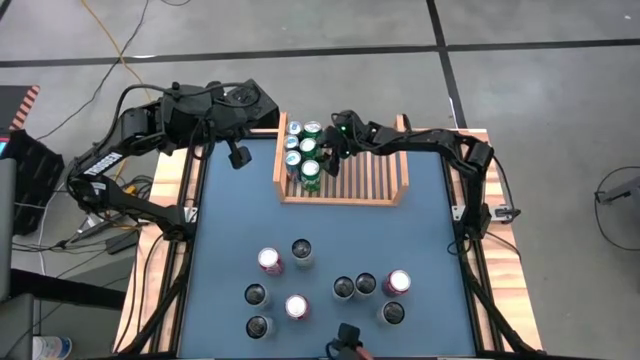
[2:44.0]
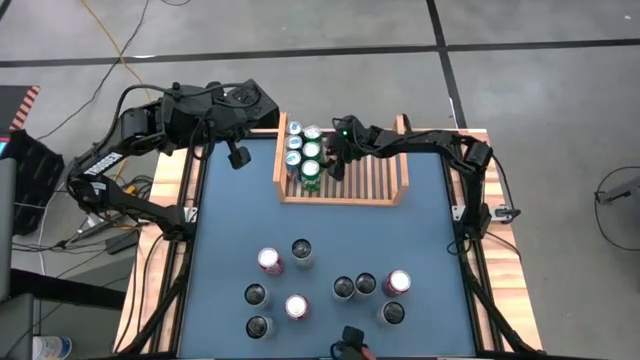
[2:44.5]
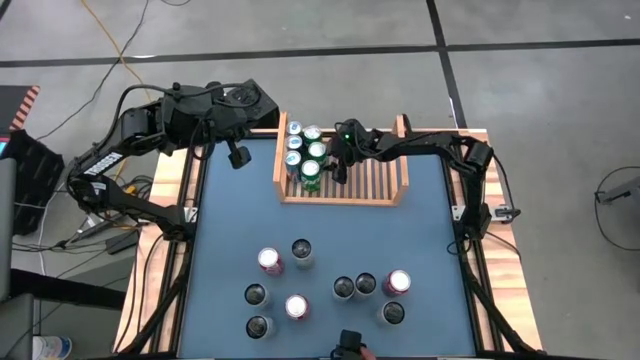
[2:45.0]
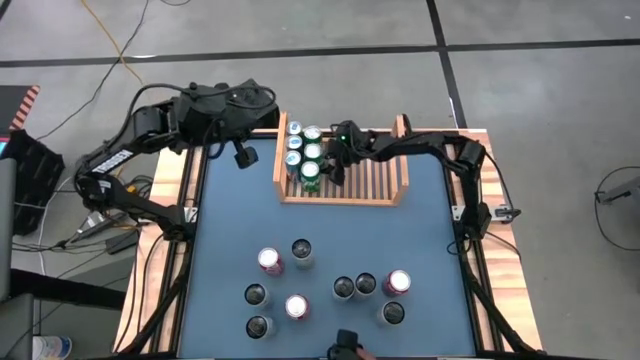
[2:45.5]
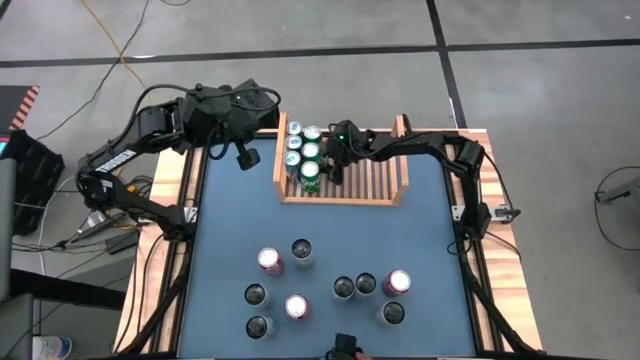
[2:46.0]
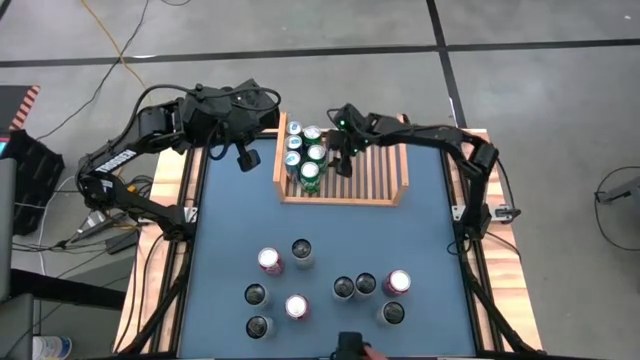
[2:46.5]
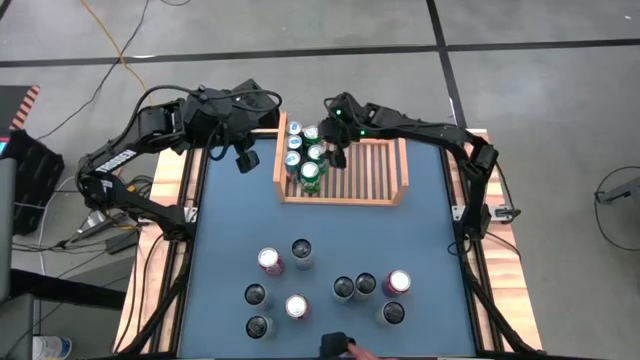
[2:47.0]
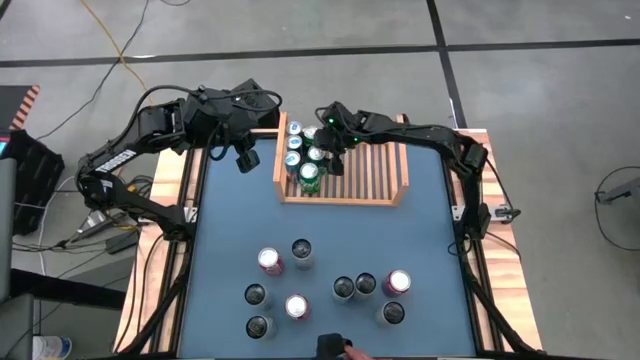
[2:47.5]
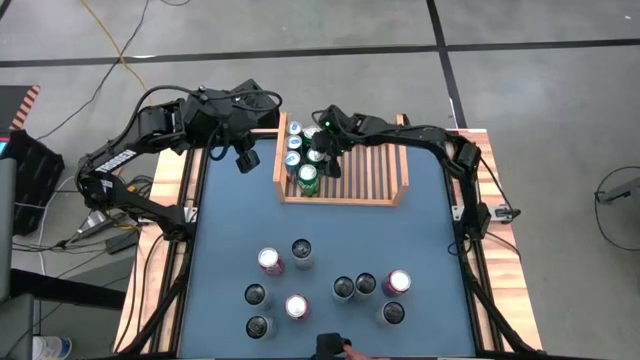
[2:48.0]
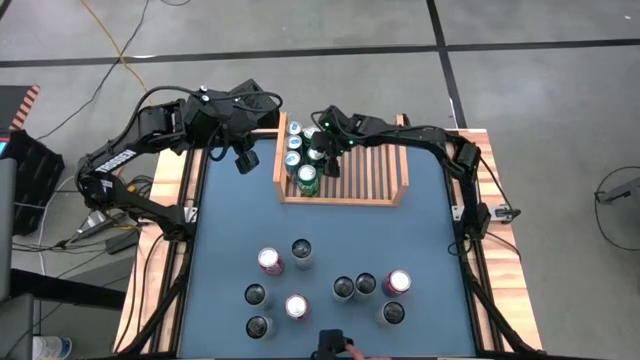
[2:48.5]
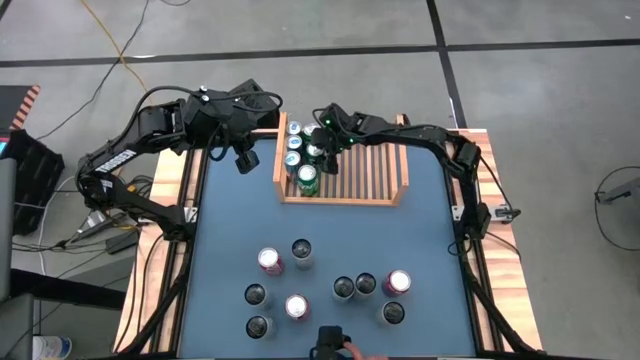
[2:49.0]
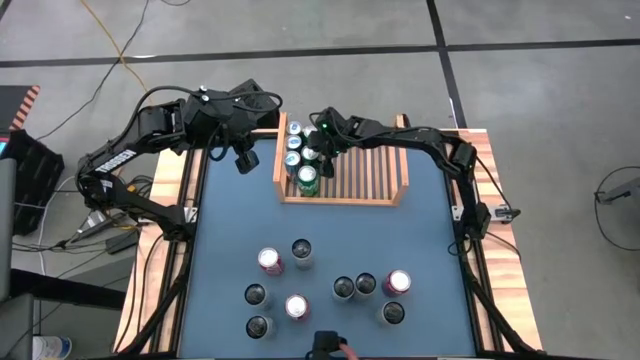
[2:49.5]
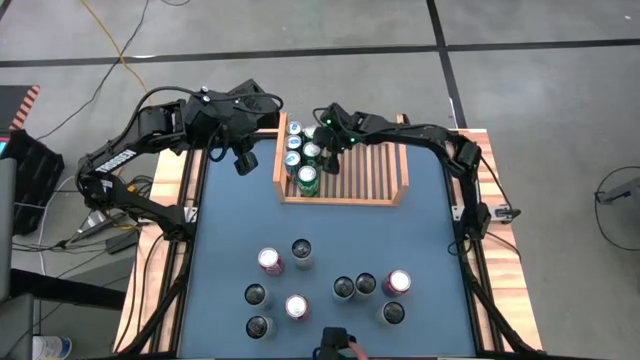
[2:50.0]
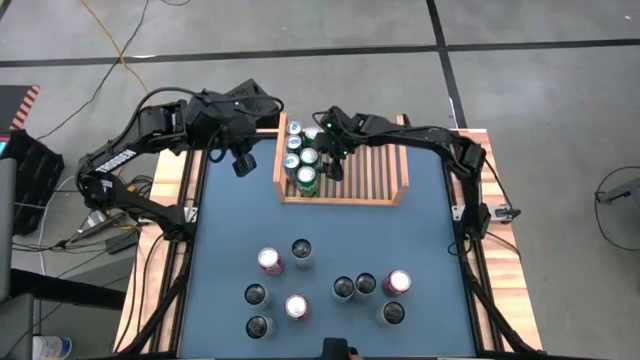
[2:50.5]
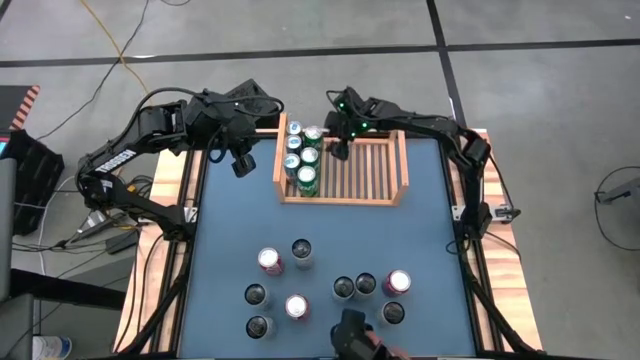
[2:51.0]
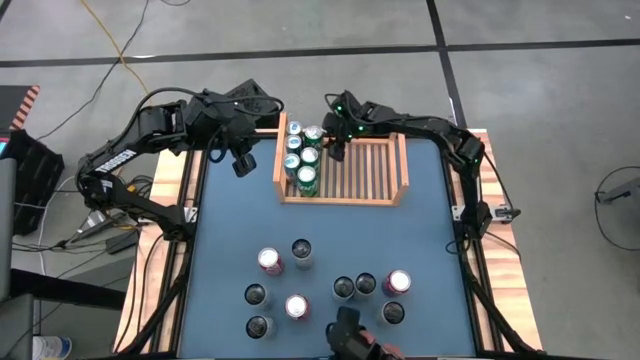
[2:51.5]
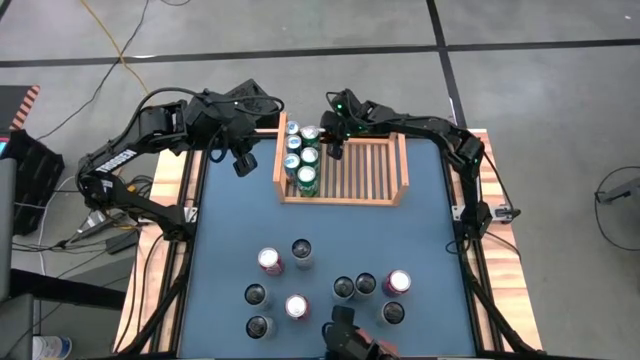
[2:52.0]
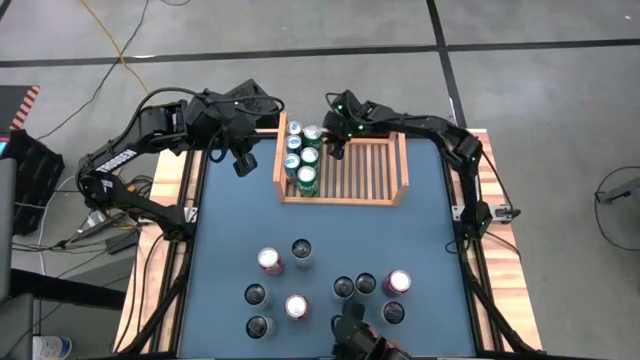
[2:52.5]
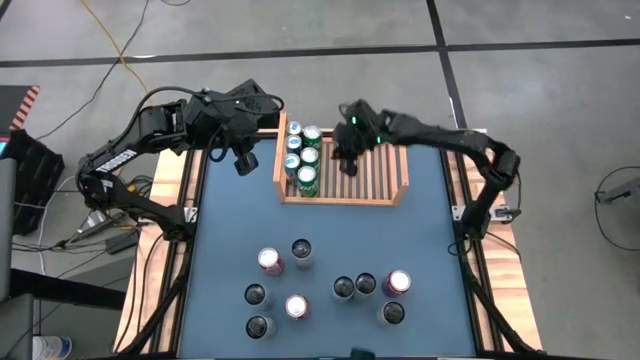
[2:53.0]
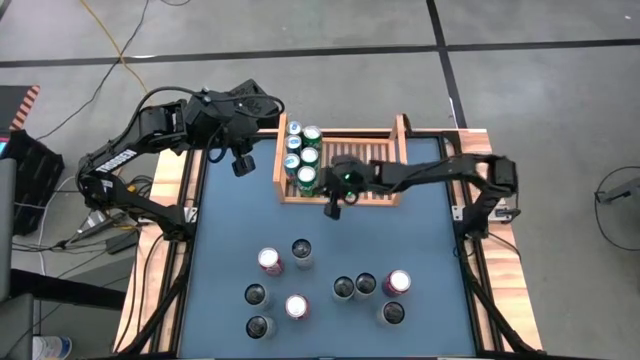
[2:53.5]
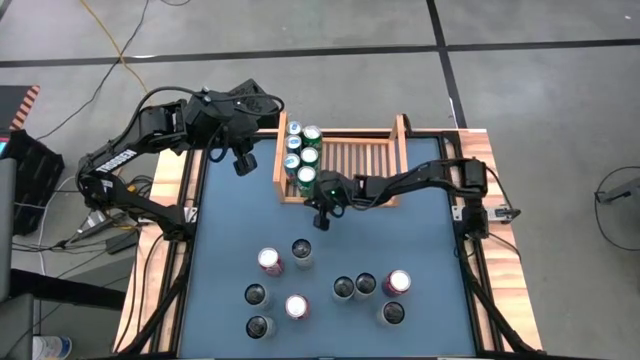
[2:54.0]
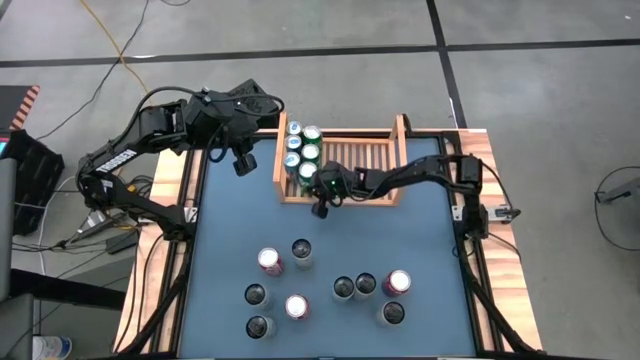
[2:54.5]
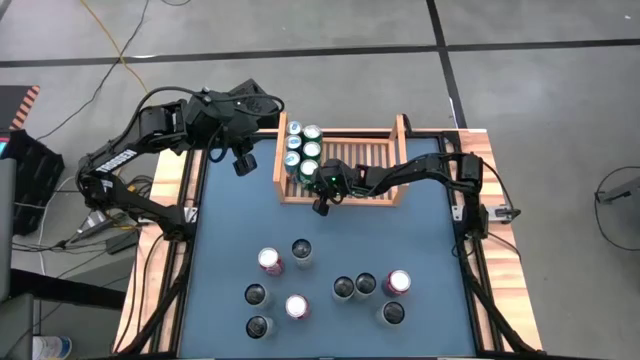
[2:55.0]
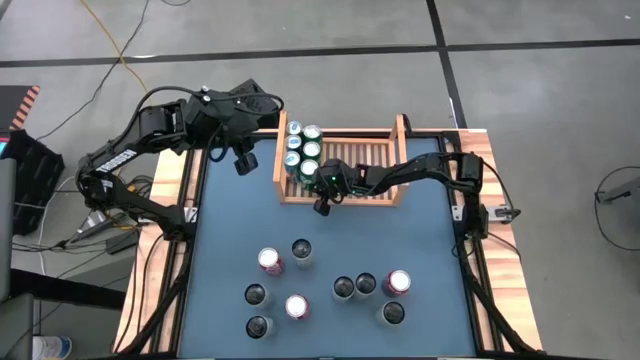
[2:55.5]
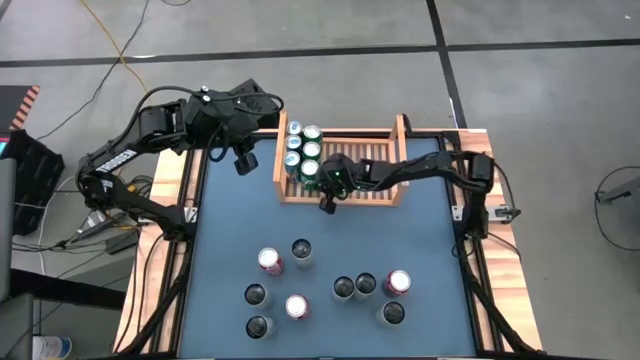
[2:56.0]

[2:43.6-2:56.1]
Task: Place canned beverage on shelf
Adjust the soda cans on the shelf

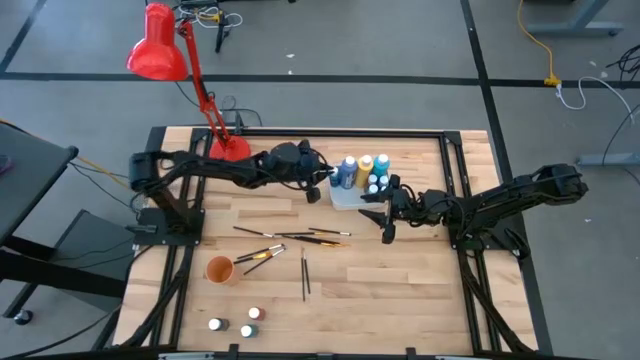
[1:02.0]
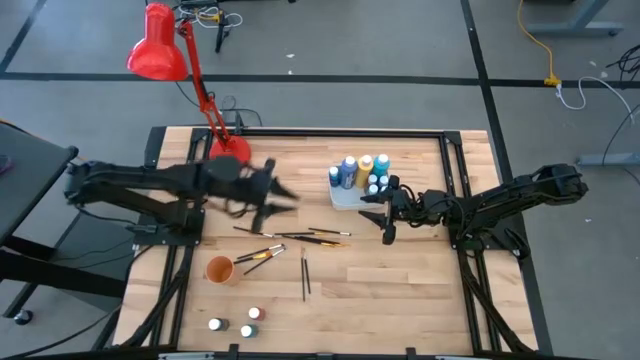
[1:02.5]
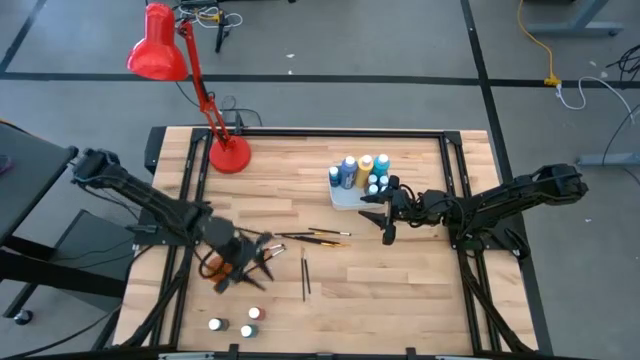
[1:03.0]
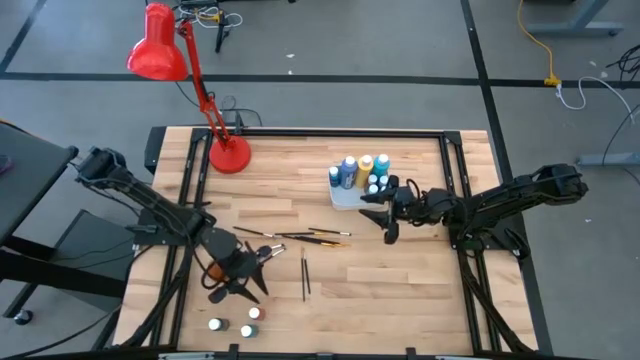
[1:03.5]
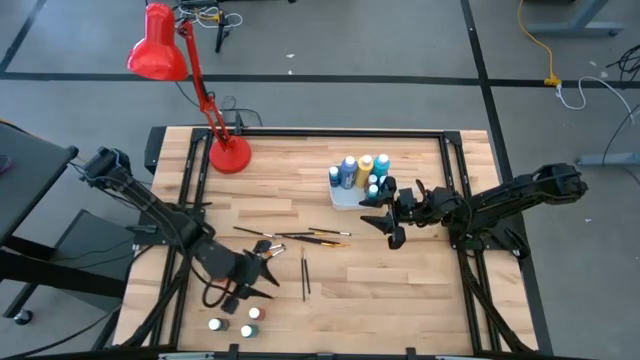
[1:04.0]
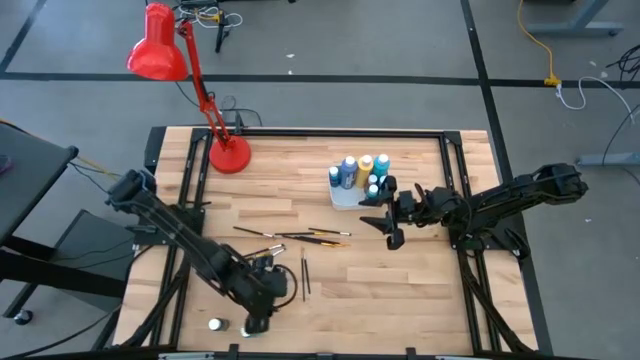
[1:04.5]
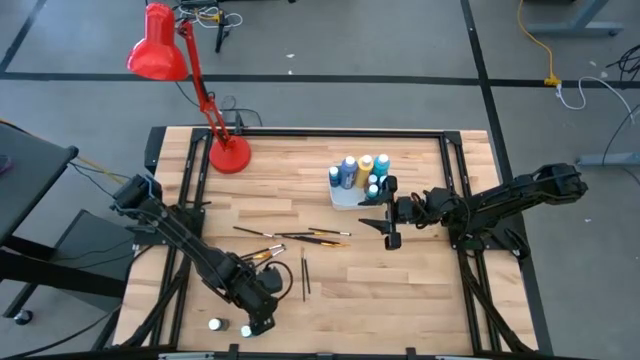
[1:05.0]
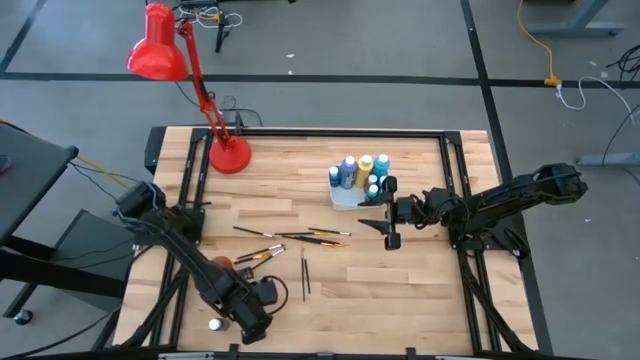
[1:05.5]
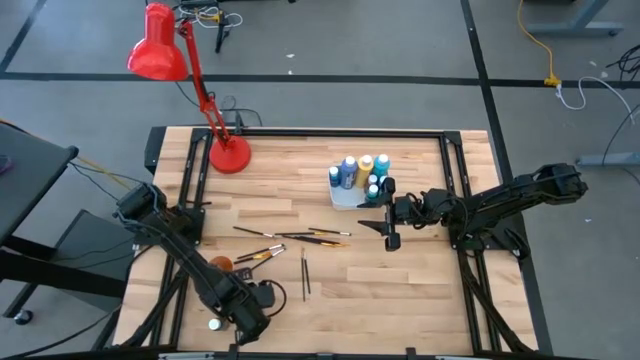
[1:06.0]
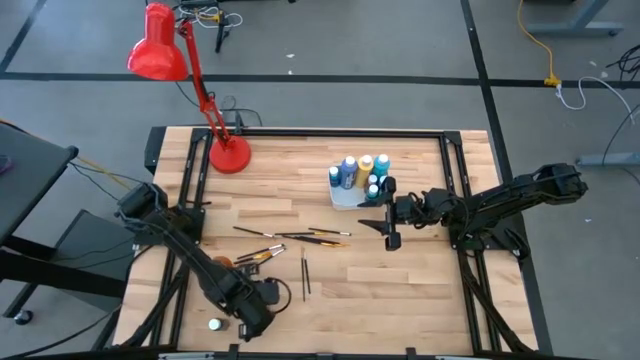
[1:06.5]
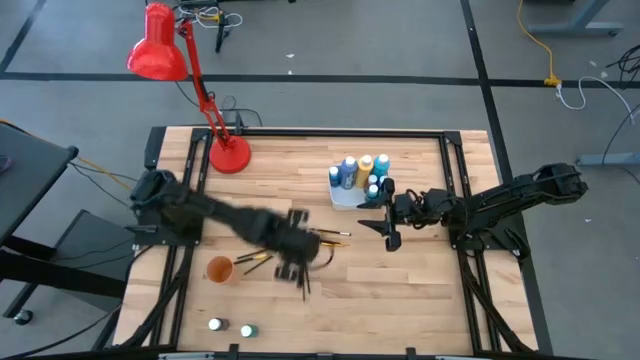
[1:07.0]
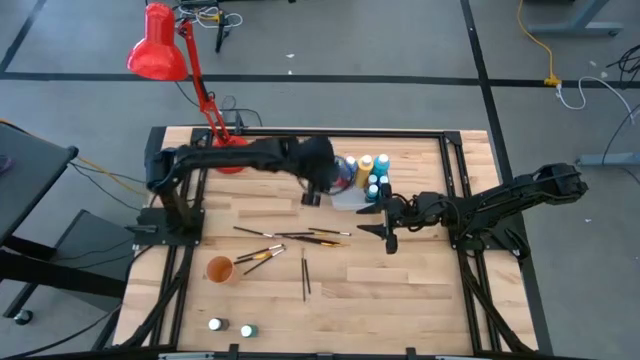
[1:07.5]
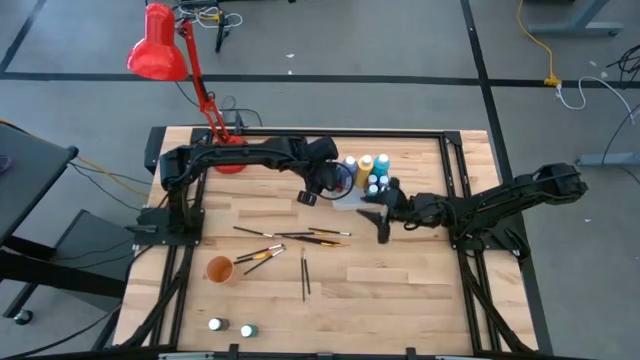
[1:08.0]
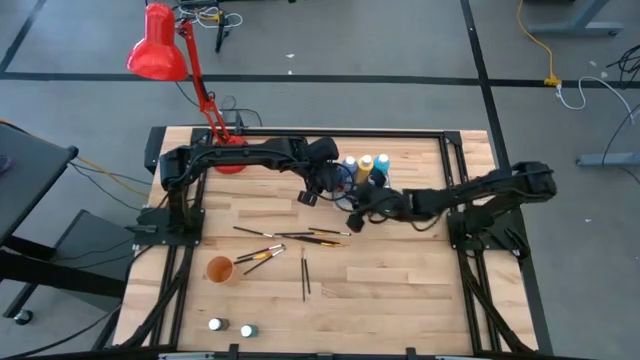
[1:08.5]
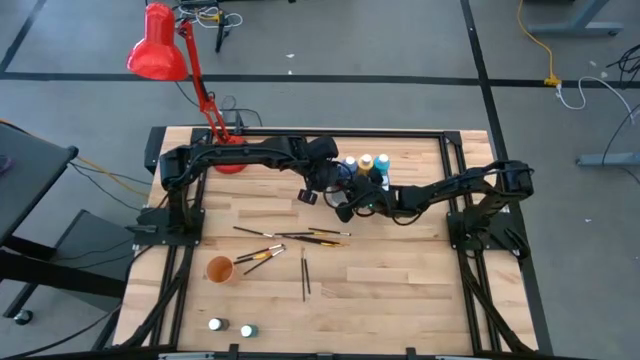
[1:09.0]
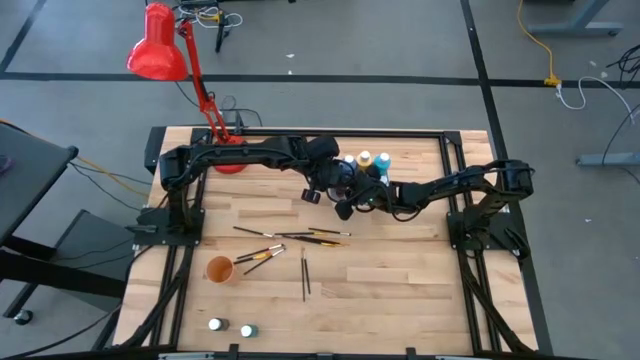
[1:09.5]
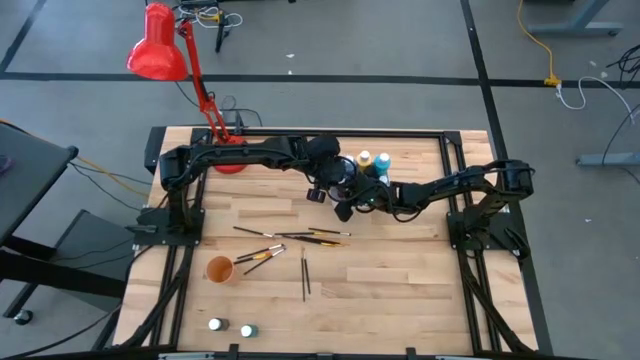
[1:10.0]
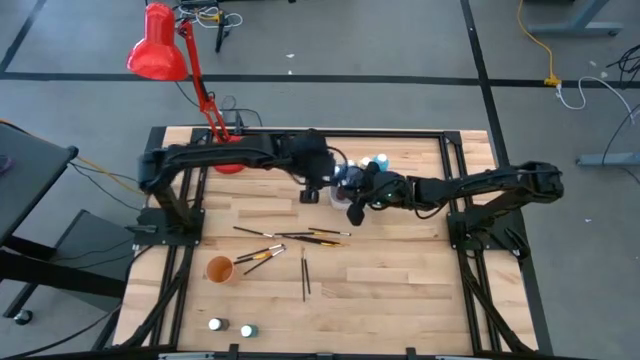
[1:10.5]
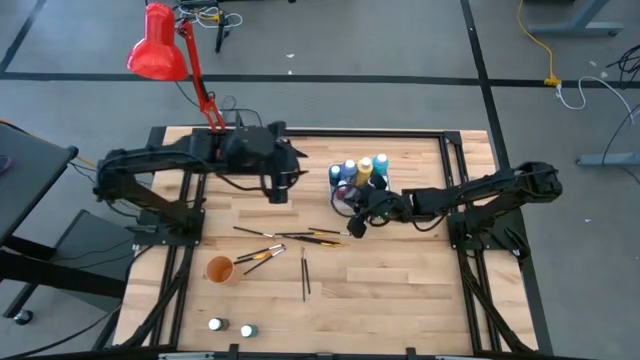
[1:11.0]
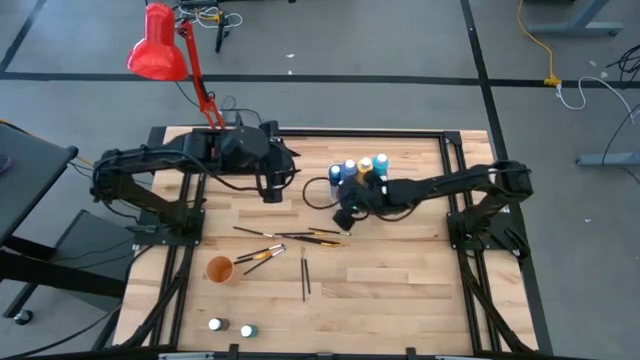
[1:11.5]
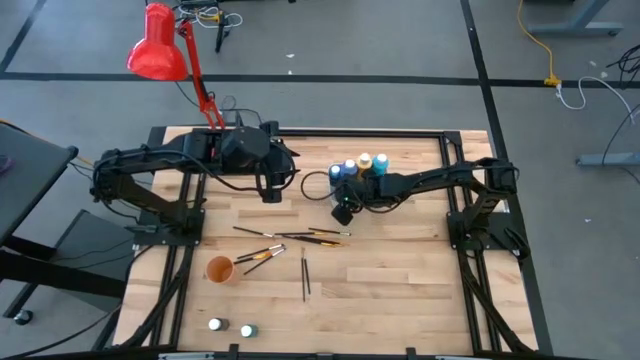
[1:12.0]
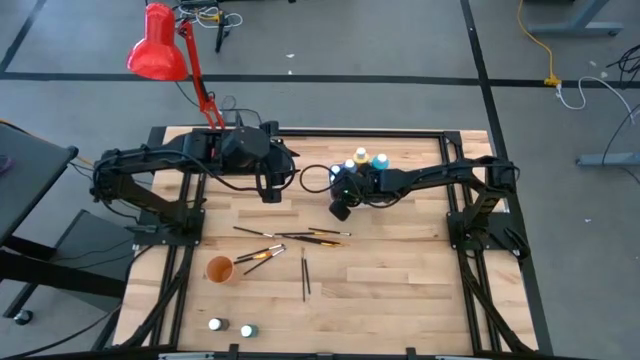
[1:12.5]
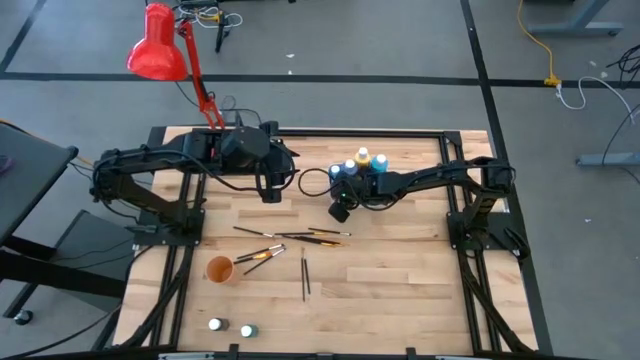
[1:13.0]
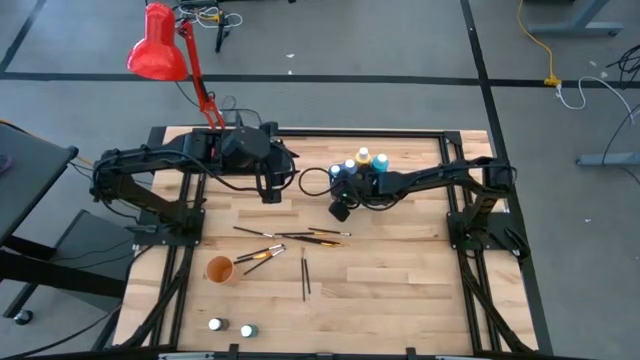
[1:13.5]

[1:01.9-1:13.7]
Task: Pick & Place Paint Supplies
Put the small orange paint bottle into the white bin
